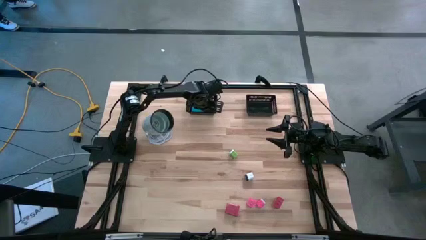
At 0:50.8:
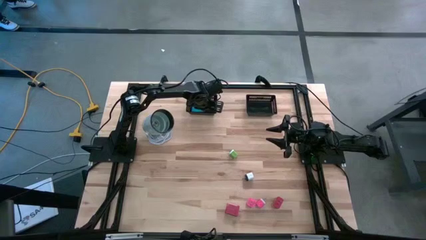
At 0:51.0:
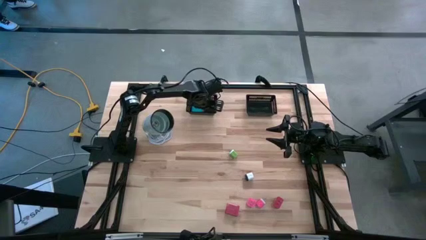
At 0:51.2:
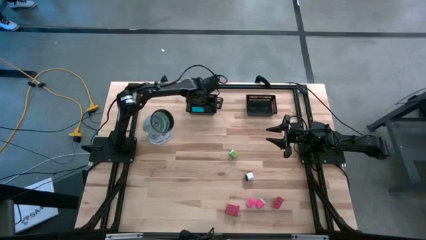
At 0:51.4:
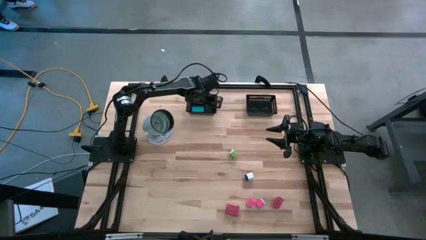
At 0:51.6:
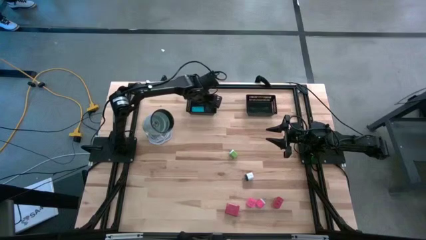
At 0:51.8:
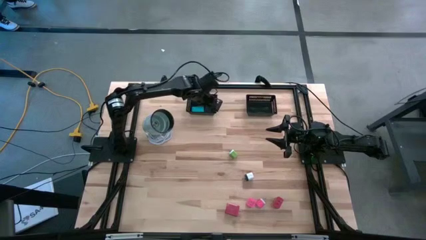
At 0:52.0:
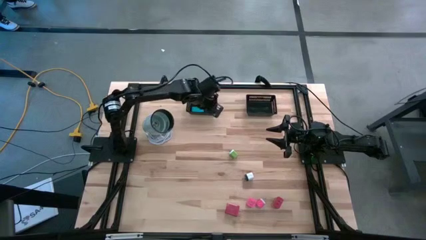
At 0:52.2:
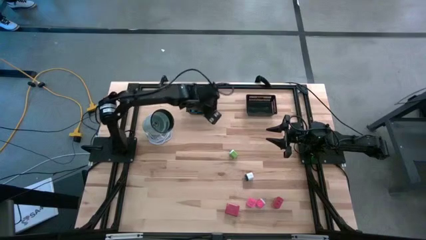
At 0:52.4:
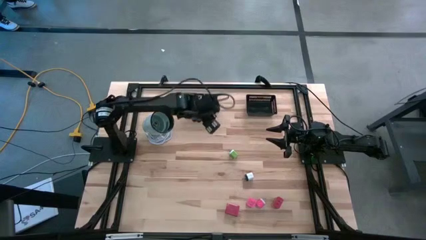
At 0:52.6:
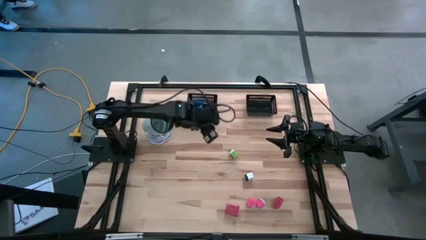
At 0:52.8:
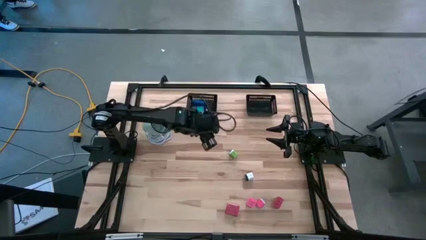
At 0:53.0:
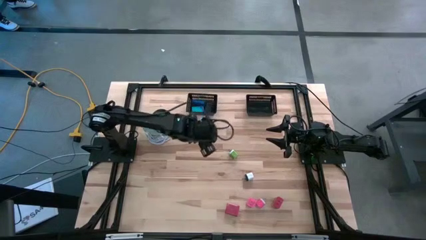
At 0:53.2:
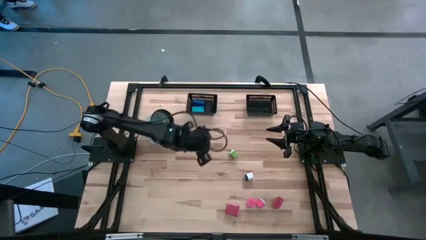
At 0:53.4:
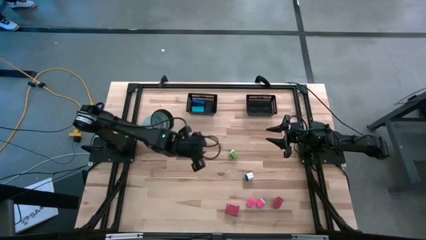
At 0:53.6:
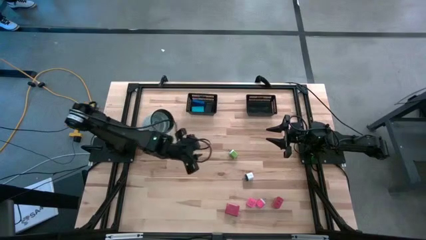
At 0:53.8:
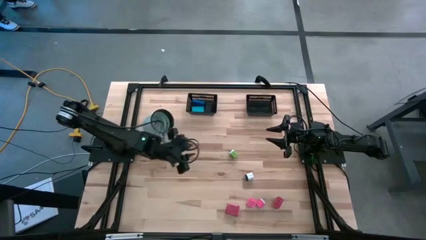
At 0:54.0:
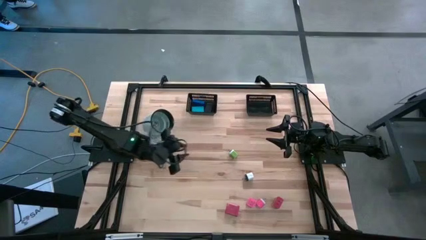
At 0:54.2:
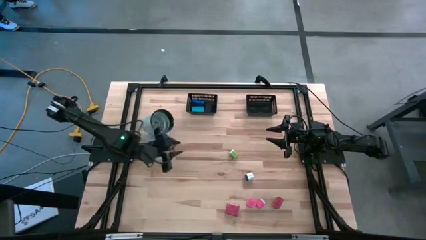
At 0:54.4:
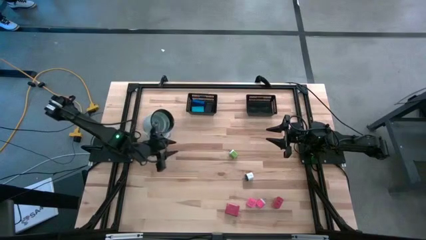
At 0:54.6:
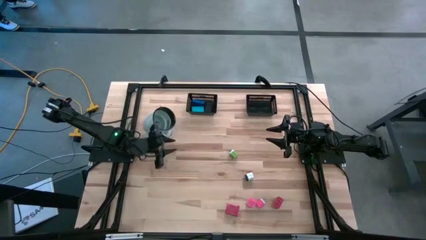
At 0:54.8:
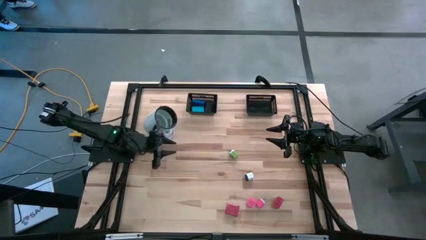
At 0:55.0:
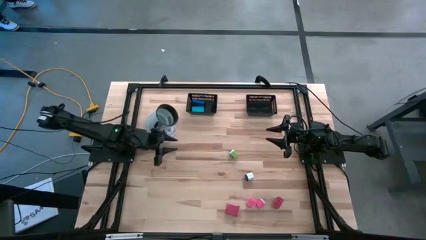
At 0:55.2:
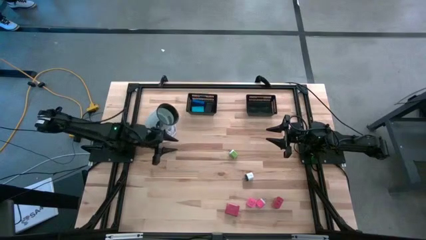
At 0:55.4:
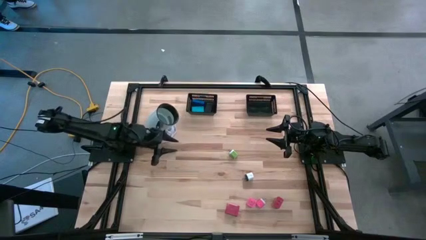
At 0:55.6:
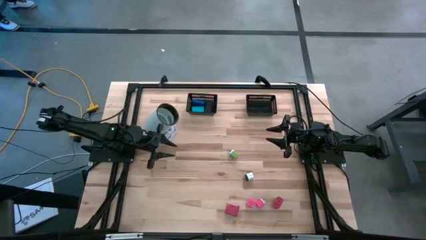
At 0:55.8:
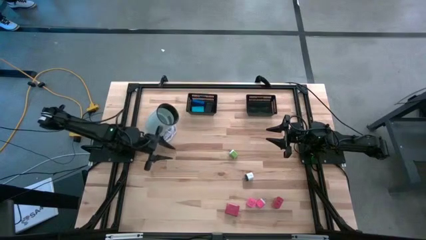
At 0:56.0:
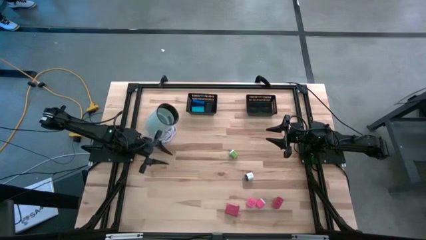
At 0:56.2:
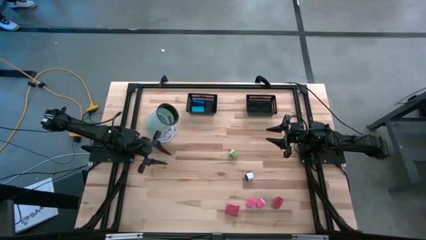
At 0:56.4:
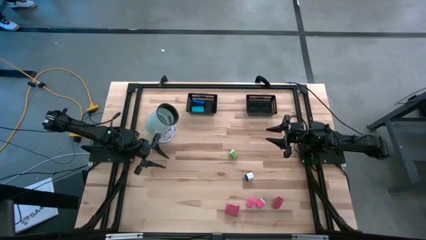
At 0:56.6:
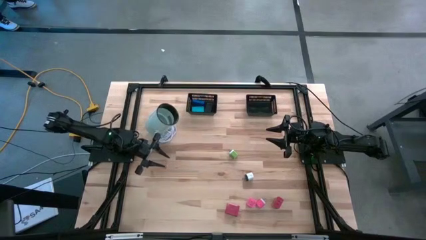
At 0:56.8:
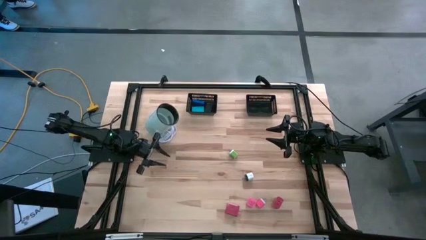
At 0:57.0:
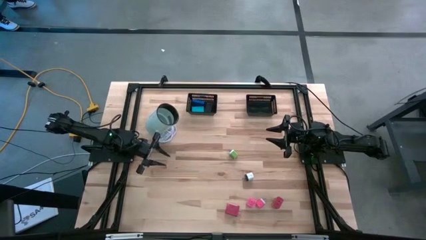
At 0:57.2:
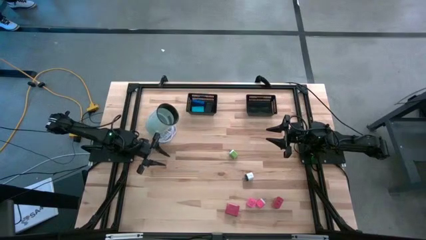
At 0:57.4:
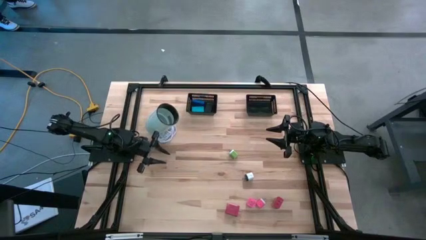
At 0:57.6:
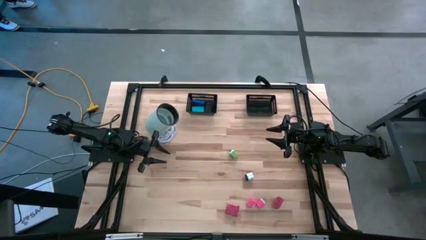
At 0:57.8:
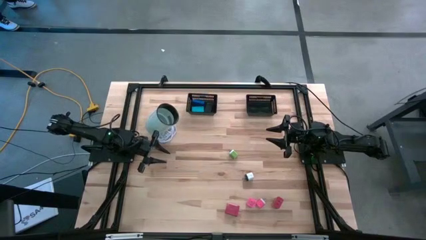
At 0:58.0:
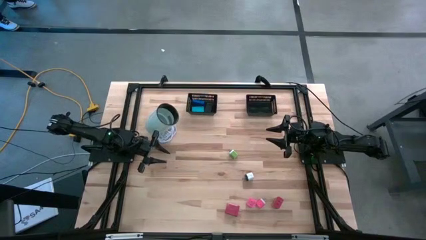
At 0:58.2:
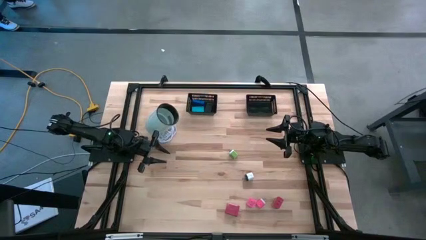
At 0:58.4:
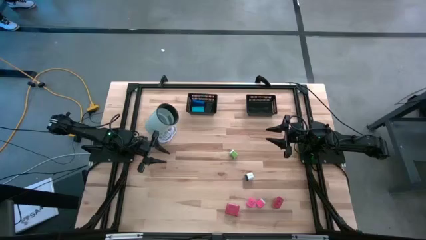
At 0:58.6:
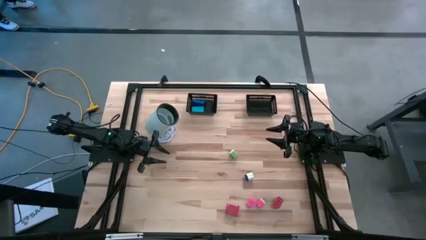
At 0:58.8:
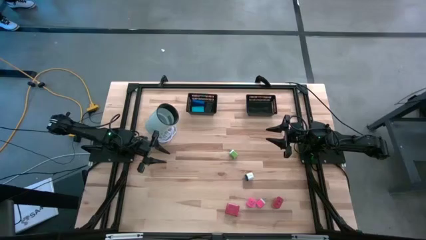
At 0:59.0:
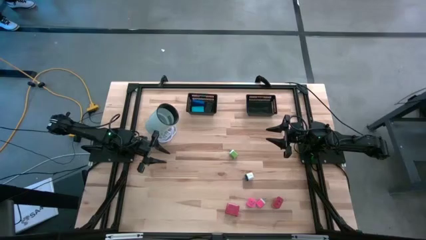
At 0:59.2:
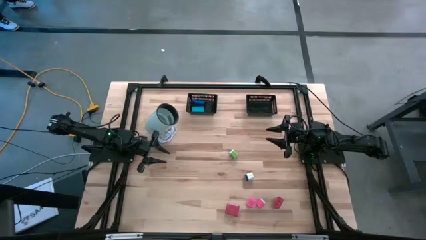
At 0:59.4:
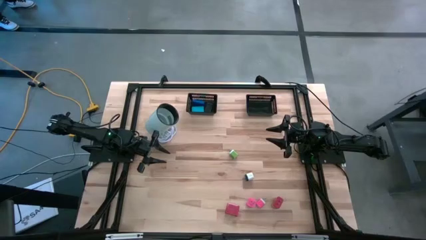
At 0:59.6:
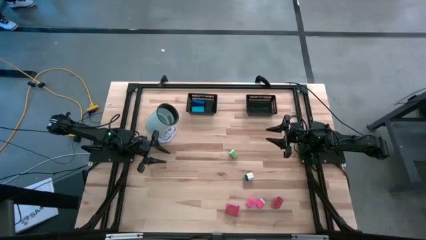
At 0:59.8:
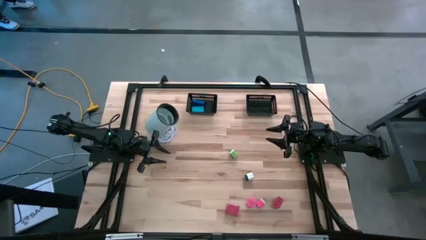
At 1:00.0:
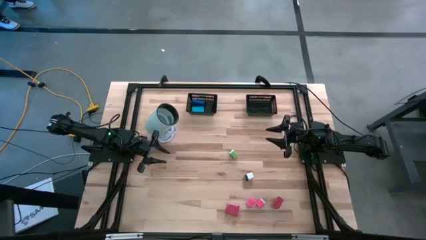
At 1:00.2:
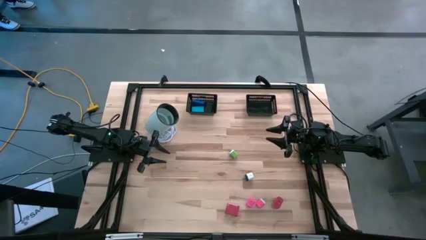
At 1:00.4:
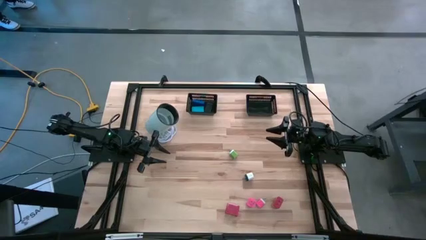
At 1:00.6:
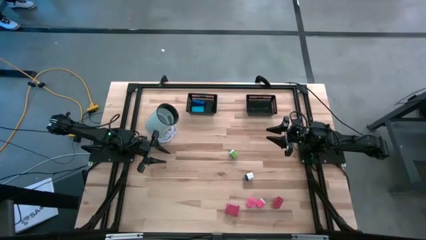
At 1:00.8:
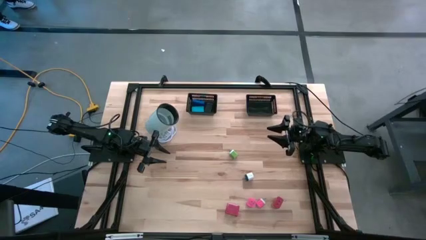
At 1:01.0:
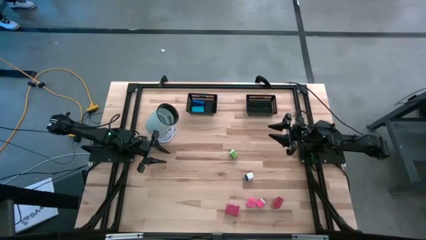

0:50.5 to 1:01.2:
Task: Pick & Place Office items
Put the green charger adapter into the right black bin

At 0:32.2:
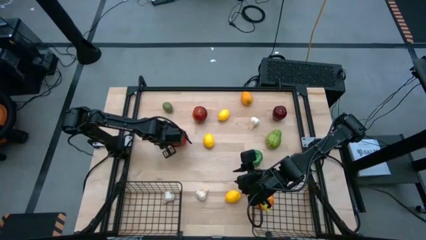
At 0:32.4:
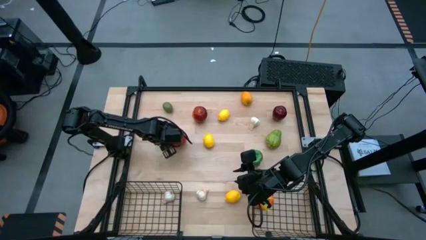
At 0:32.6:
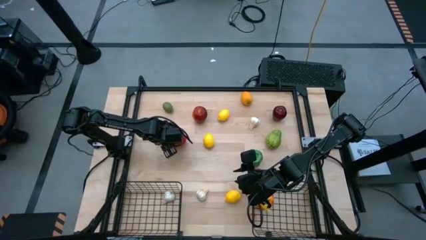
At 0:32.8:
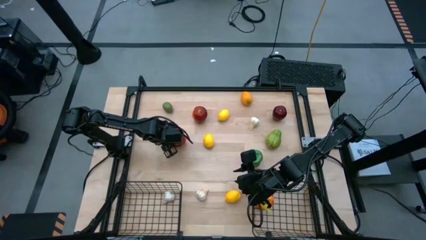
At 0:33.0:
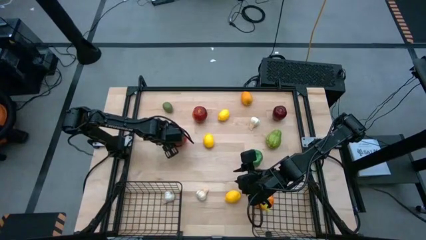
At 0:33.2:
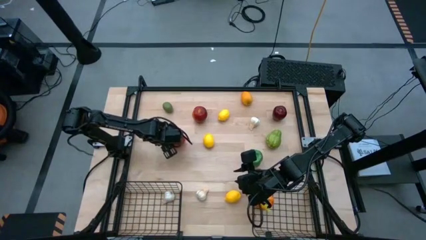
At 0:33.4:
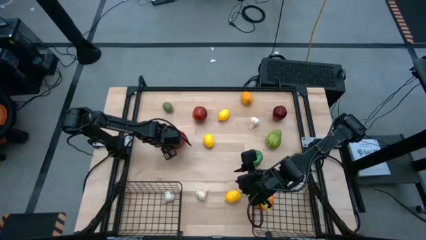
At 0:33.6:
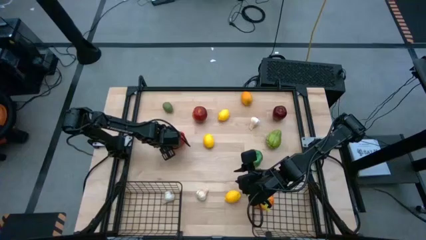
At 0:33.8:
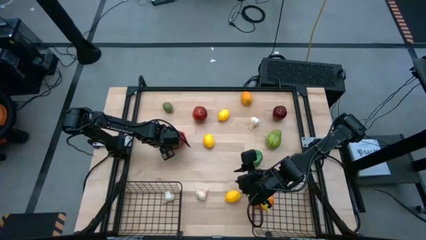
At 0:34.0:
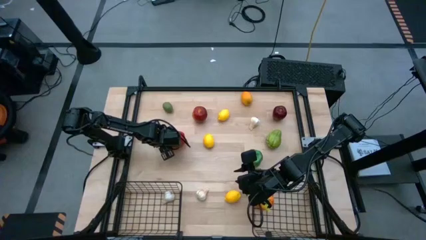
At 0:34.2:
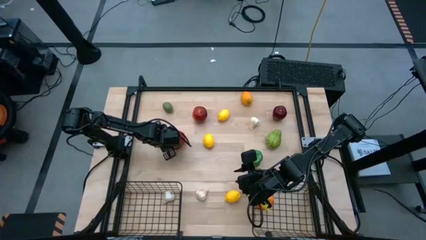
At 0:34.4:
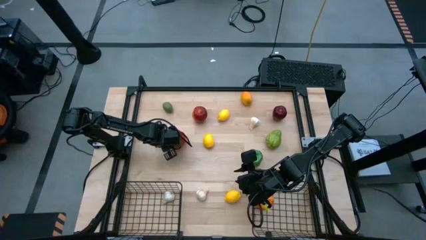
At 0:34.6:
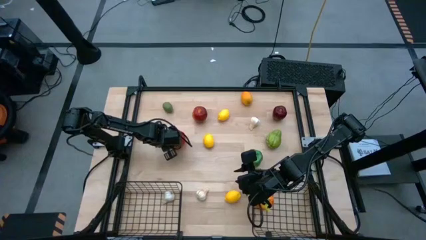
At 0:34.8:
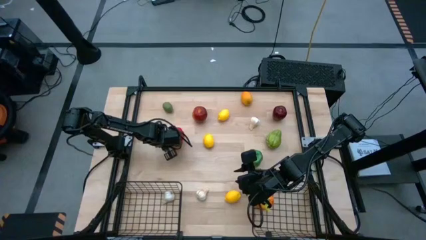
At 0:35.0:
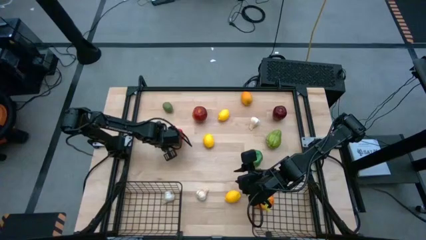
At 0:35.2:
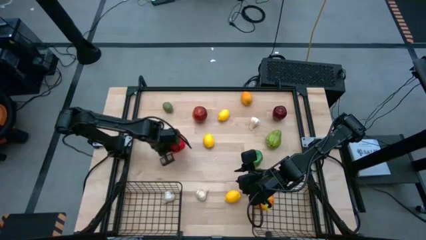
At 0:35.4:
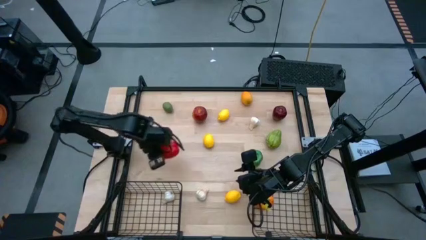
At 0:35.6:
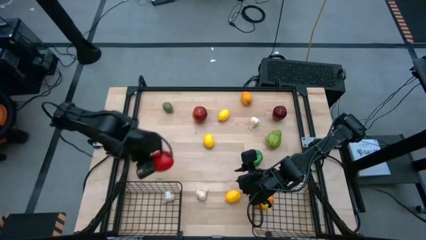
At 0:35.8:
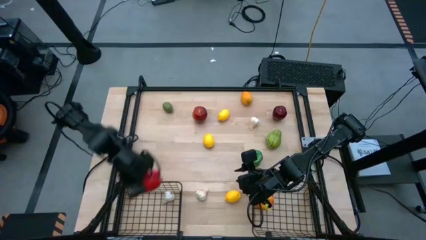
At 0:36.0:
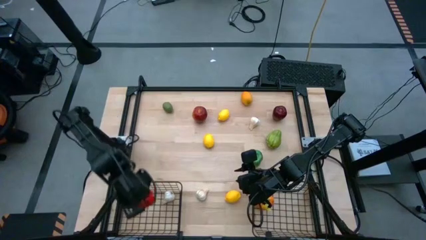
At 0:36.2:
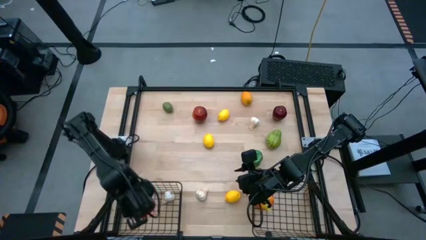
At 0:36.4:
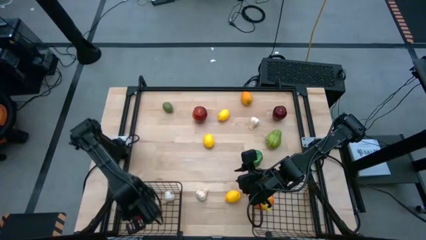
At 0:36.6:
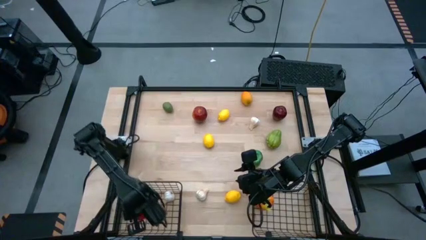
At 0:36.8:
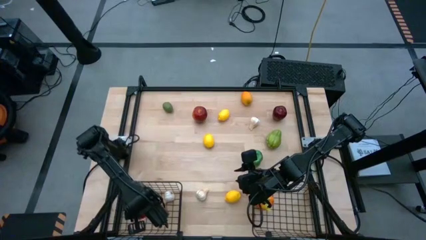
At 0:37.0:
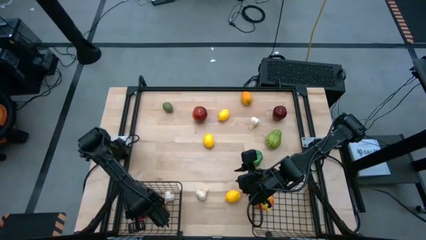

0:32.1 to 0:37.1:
Task: Sort produce into baskets
Put the red bell pepper into the left black wire basket
